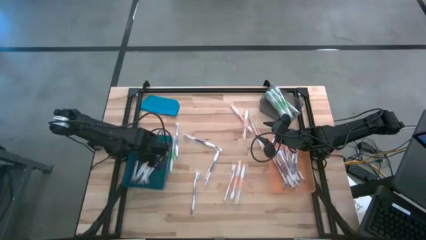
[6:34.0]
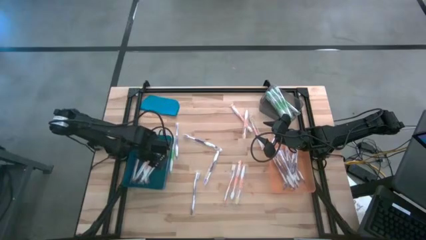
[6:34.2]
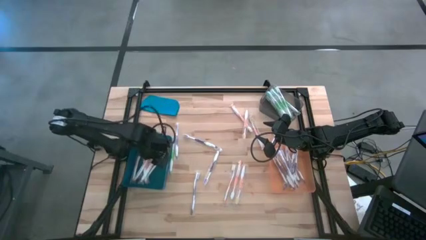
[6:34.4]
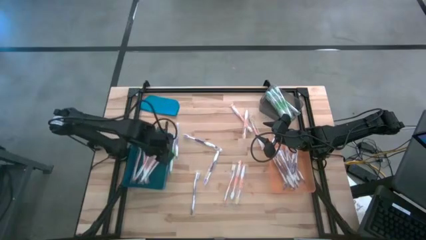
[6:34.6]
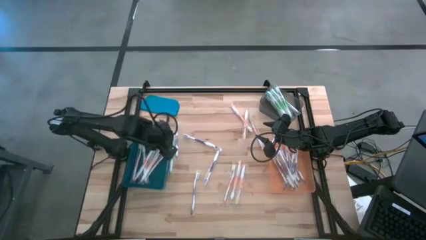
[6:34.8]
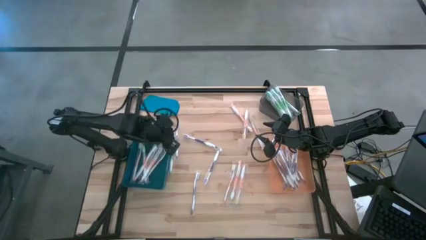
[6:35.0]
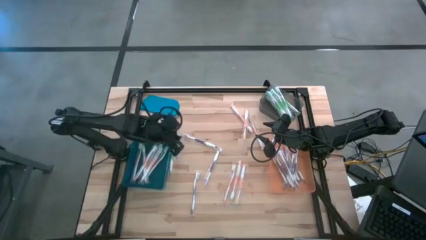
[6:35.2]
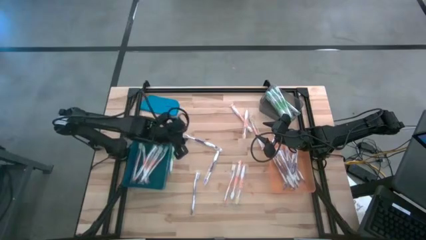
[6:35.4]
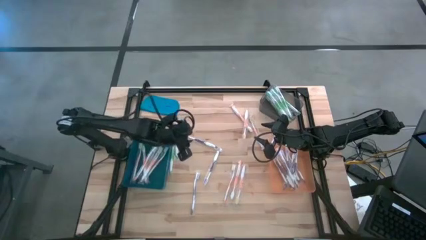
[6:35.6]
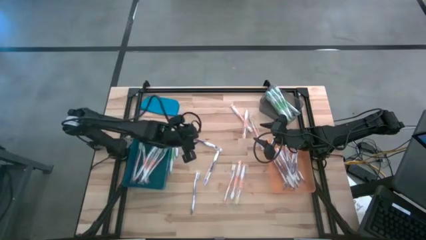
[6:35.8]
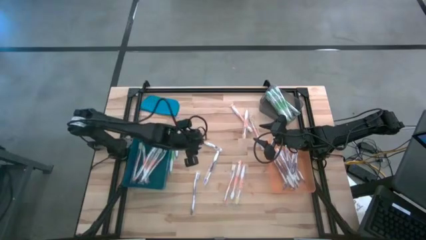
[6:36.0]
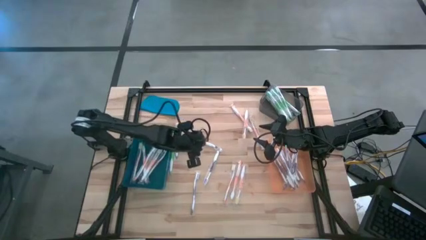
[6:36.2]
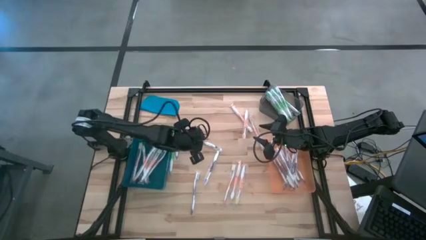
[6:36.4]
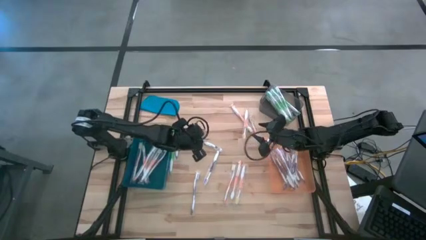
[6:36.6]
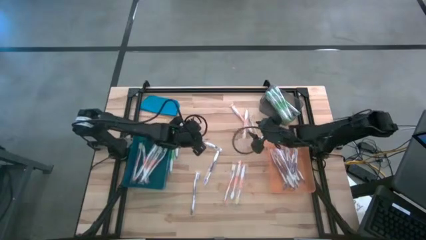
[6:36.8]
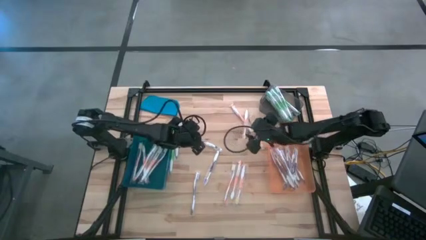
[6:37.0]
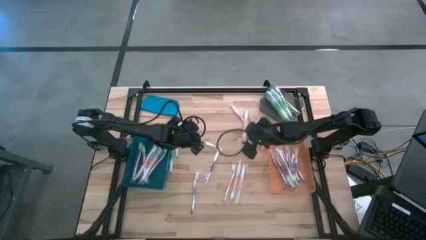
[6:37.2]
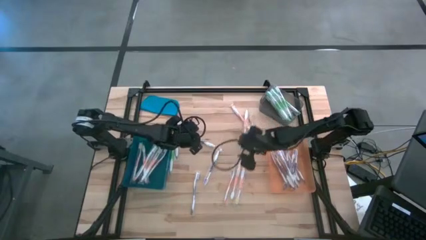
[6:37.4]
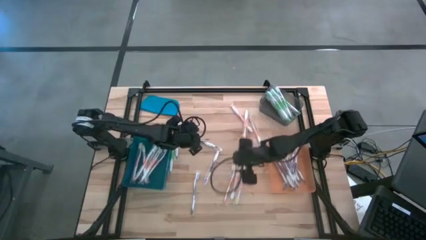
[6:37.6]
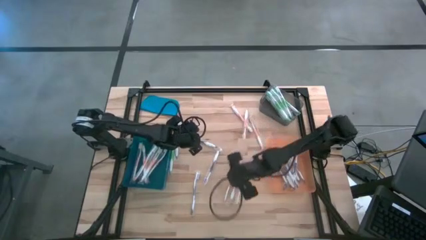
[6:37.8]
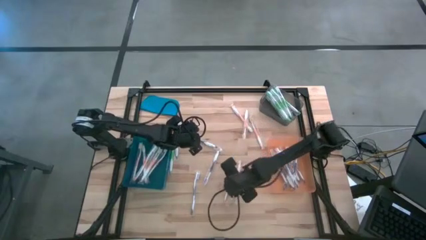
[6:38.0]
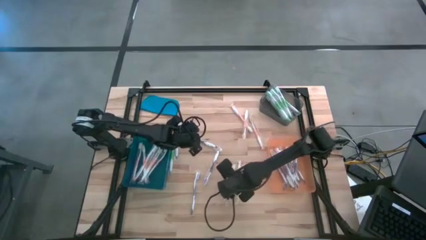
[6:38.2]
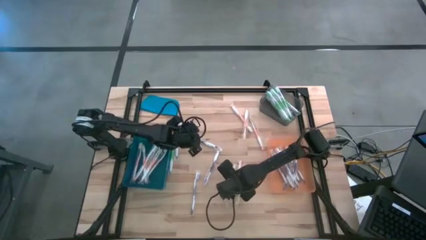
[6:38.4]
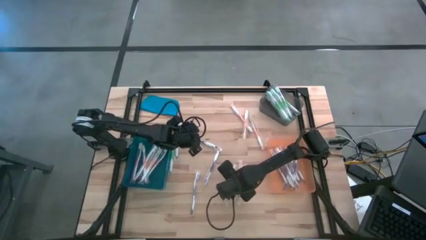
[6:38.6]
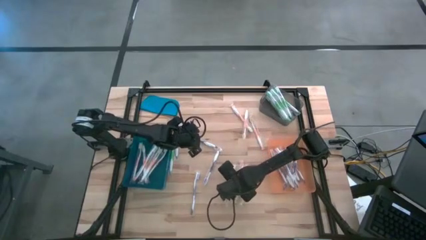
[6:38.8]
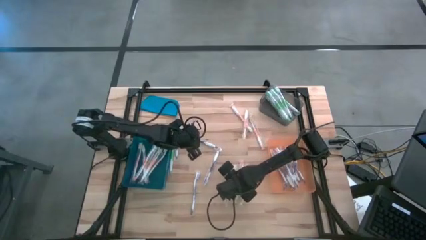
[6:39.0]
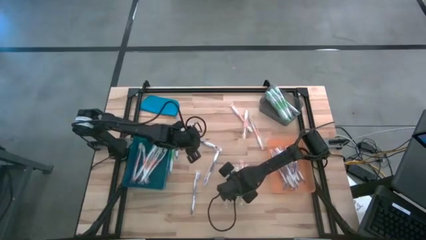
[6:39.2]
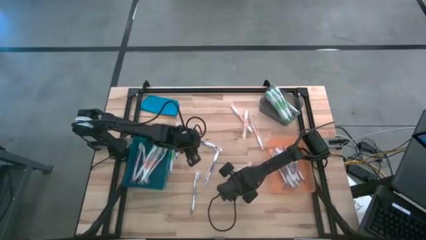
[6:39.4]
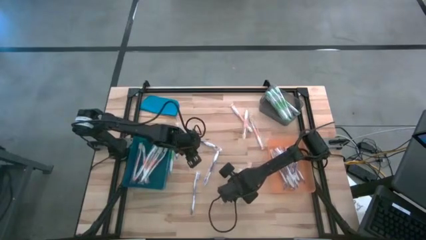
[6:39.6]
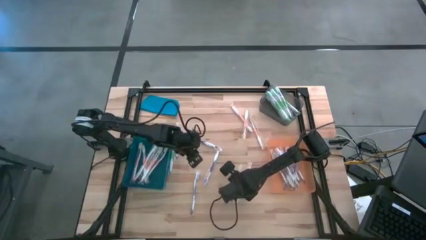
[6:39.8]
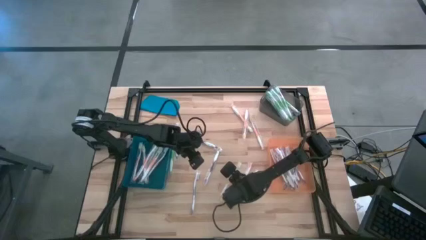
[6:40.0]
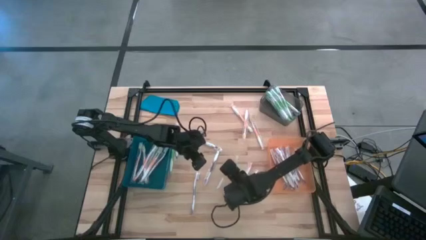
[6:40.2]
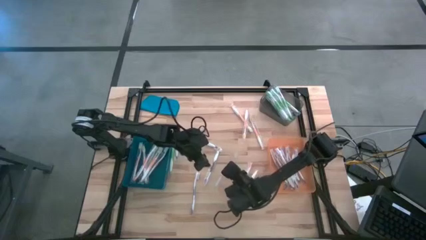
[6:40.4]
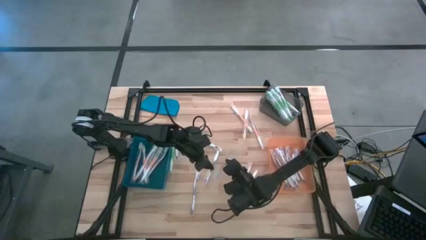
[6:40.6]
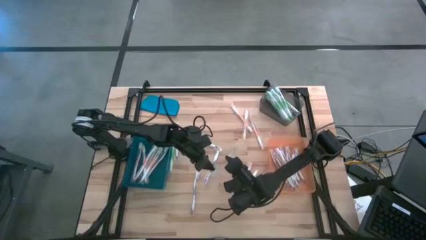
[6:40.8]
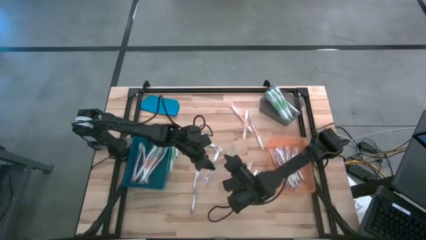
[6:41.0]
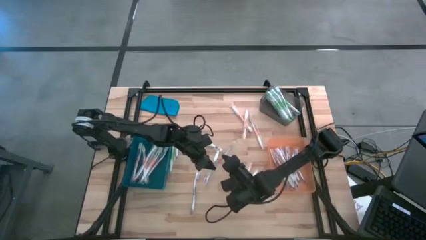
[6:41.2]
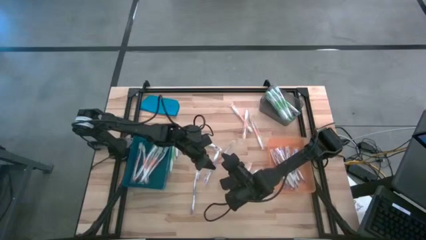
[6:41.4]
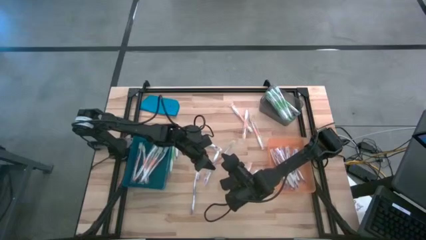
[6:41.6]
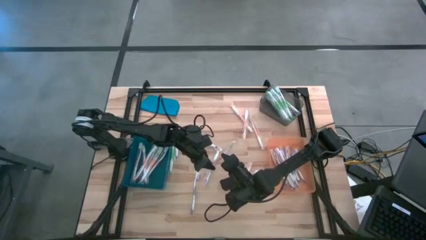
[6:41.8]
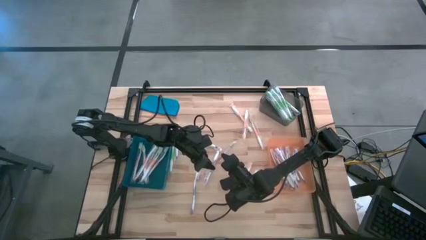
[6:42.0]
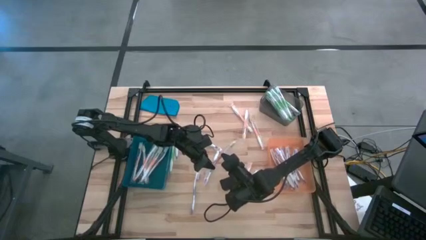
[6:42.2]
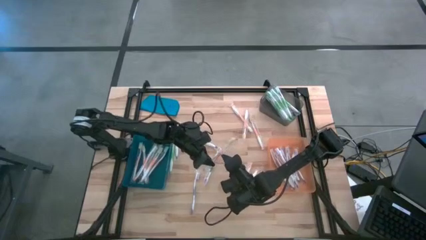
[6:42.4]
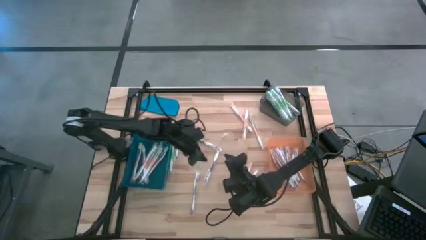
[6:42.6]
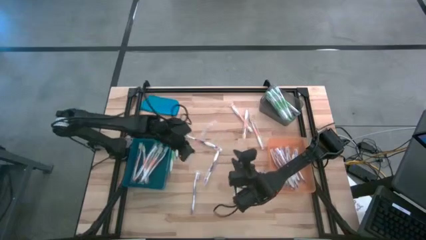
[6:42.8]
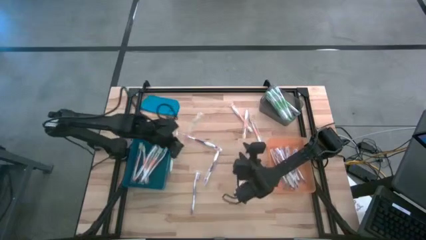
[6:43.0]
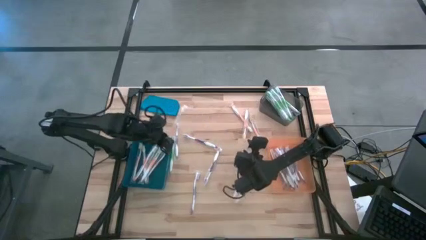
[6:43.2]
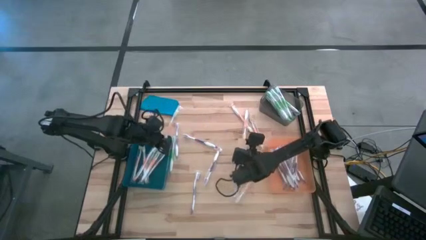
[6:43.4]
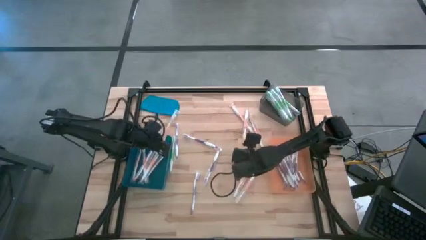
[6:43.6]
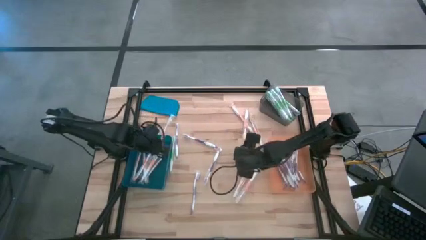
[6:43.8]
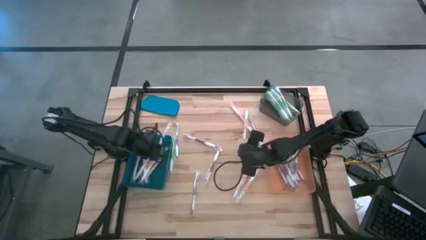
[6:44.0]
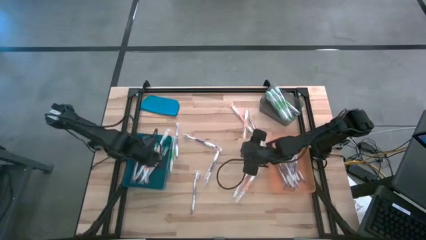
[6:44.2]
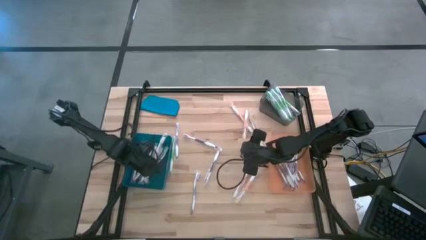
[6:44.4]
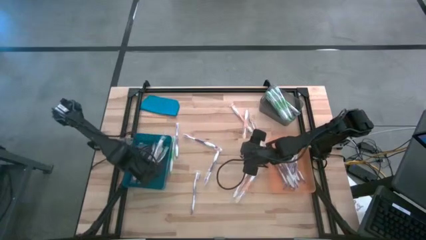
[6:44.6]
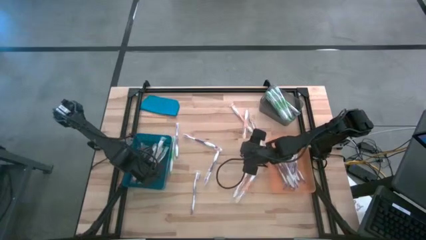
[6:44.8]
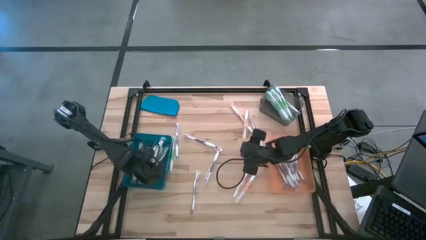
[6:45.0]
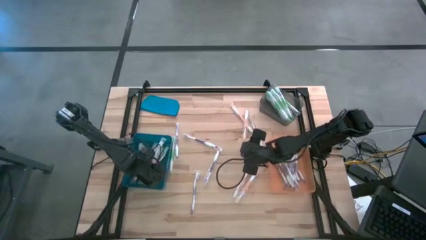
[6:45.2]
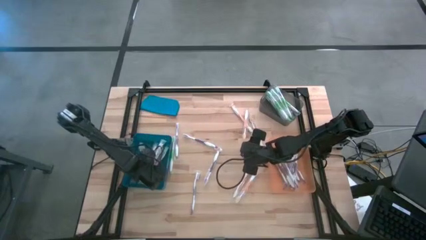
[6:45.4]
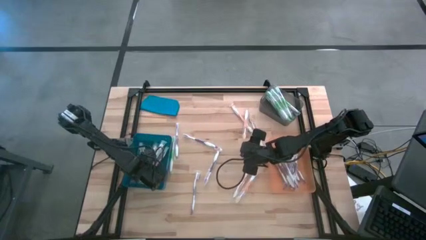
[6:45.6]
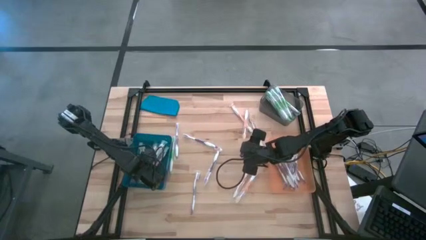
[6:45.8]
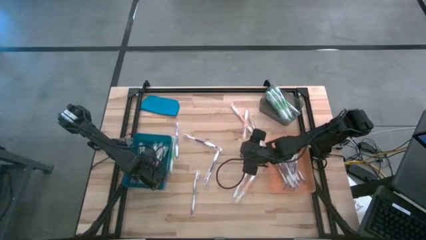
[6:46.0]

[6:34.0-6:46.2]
Task: Pick & Place Toothbrushes
Put the orange toothbrush into the blue bin
